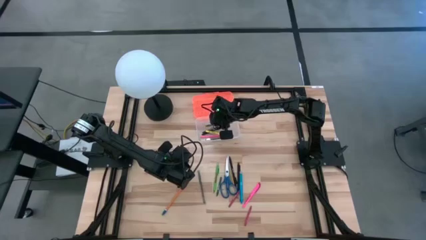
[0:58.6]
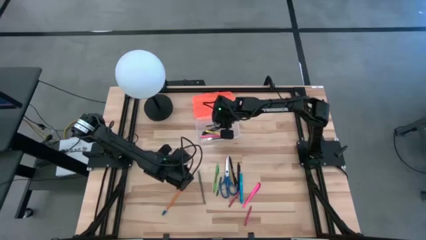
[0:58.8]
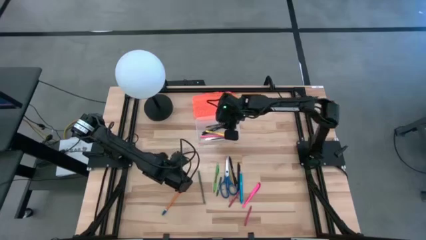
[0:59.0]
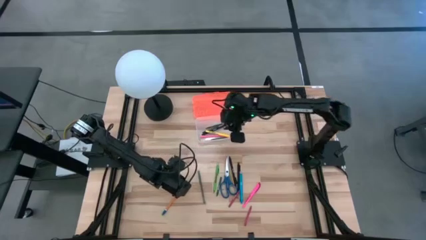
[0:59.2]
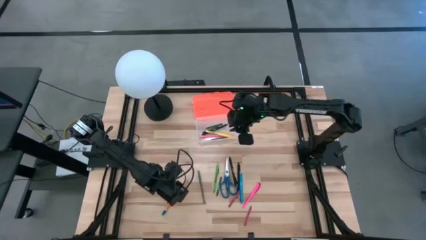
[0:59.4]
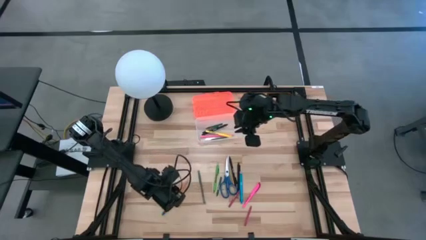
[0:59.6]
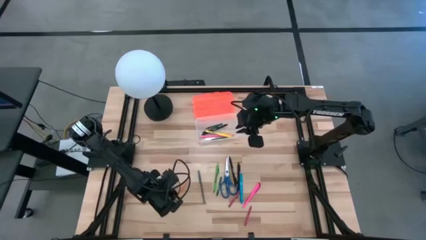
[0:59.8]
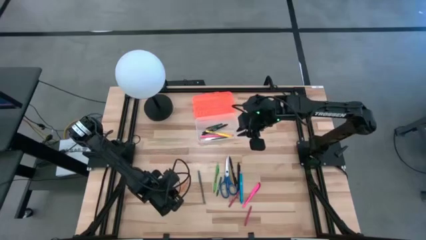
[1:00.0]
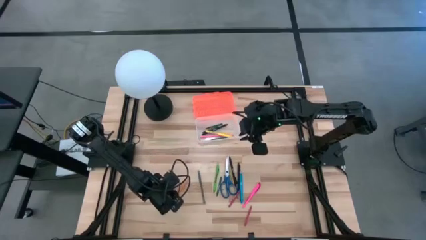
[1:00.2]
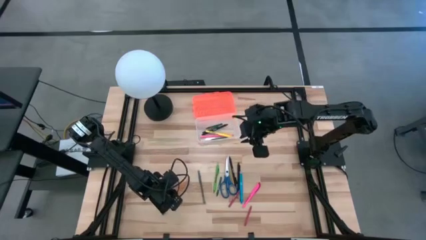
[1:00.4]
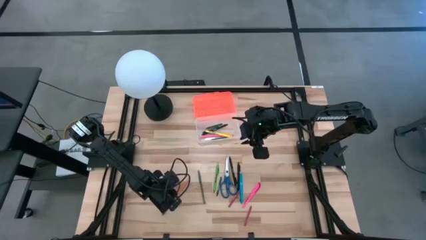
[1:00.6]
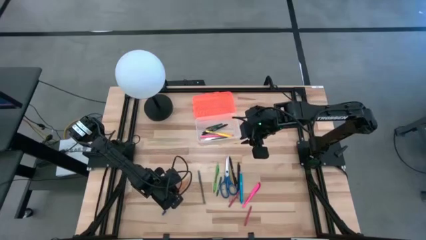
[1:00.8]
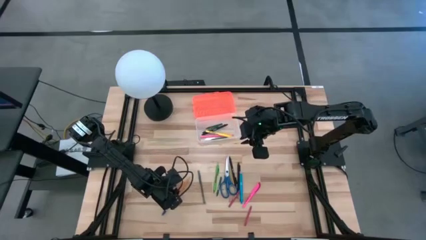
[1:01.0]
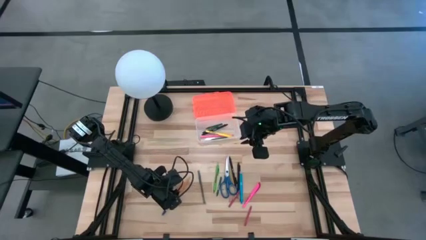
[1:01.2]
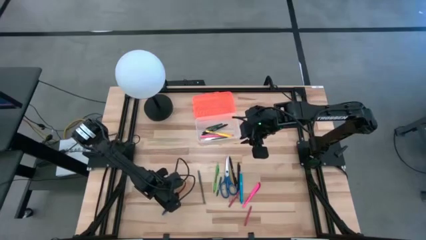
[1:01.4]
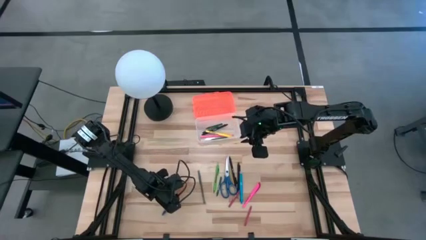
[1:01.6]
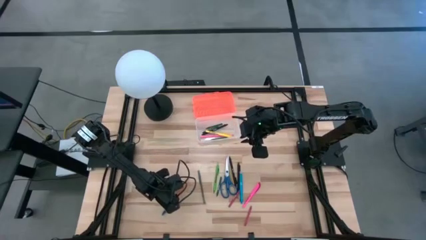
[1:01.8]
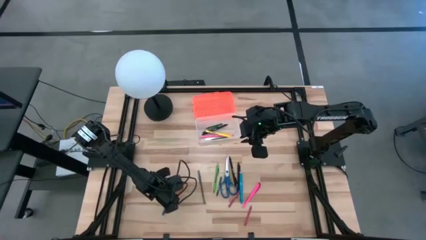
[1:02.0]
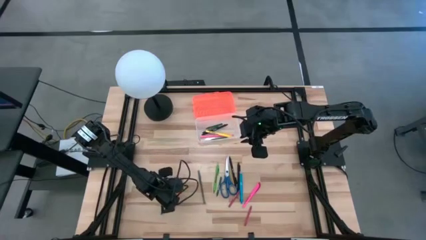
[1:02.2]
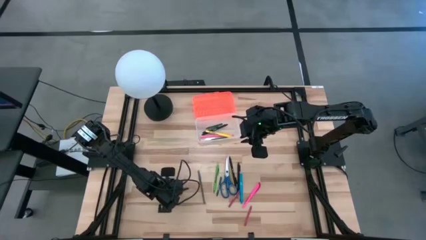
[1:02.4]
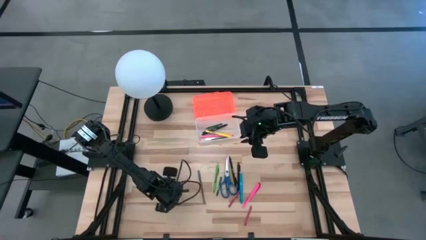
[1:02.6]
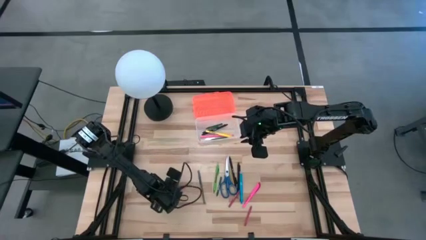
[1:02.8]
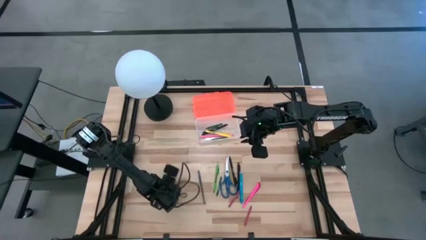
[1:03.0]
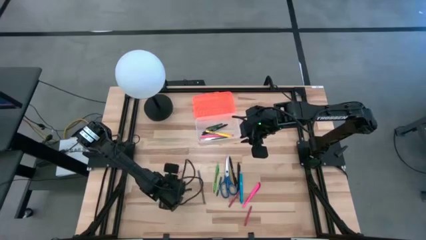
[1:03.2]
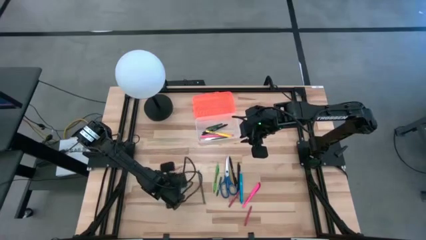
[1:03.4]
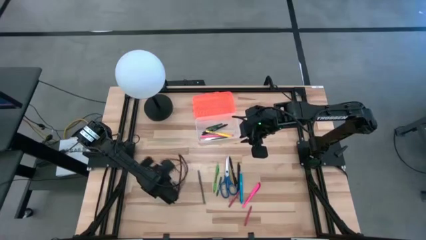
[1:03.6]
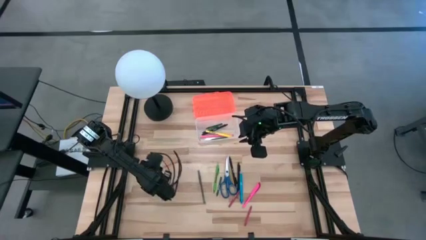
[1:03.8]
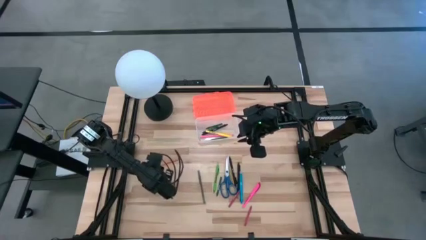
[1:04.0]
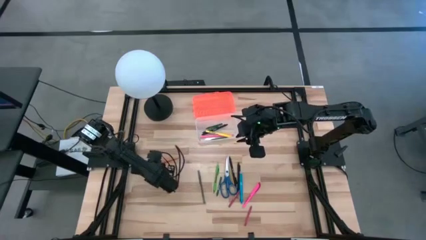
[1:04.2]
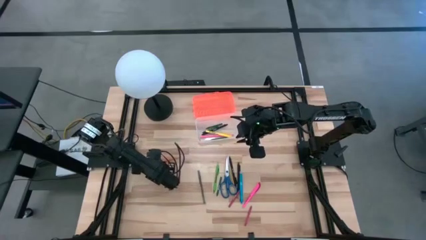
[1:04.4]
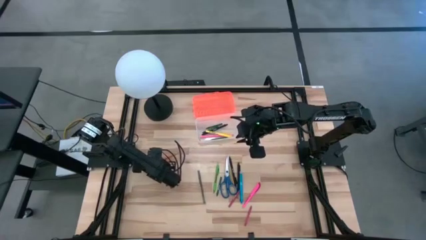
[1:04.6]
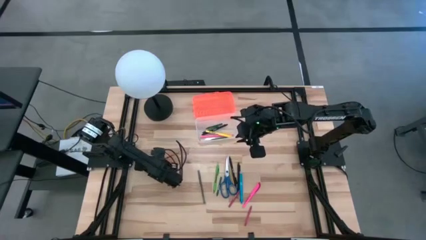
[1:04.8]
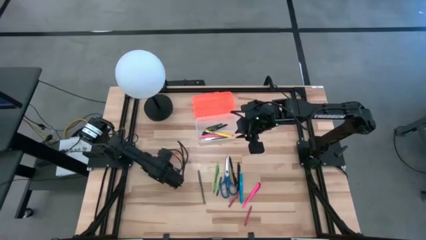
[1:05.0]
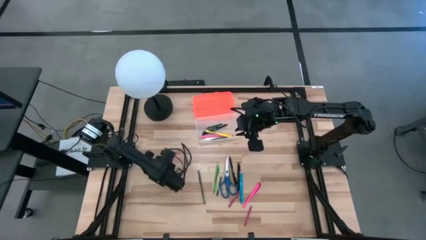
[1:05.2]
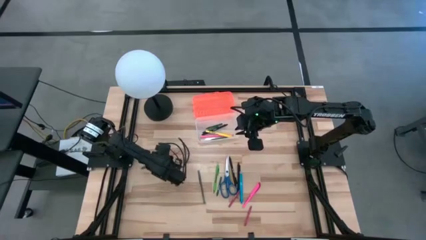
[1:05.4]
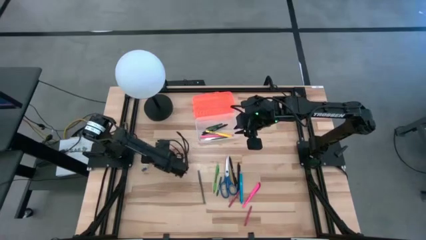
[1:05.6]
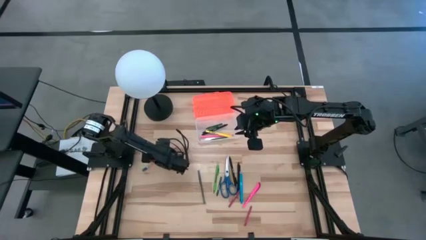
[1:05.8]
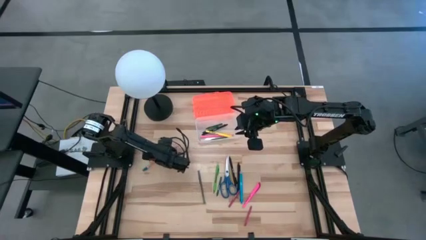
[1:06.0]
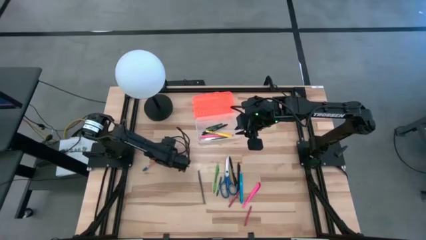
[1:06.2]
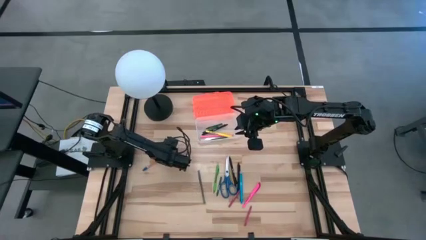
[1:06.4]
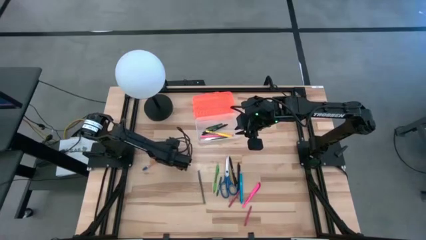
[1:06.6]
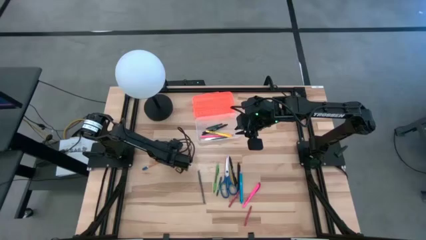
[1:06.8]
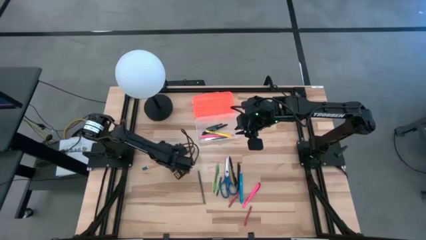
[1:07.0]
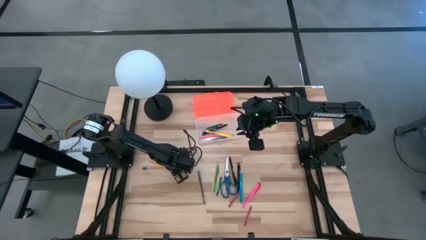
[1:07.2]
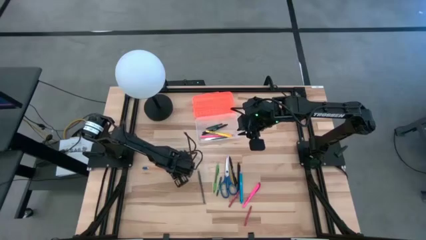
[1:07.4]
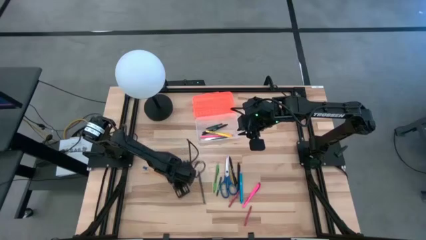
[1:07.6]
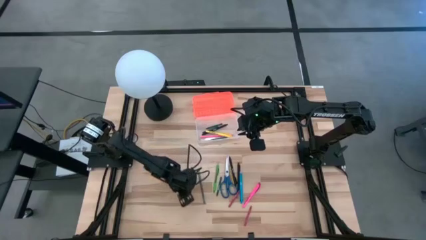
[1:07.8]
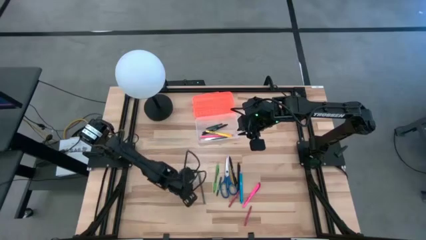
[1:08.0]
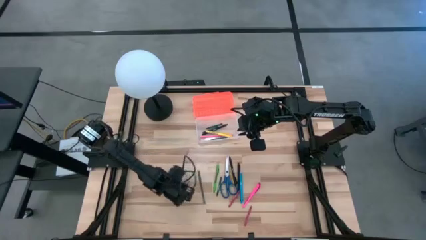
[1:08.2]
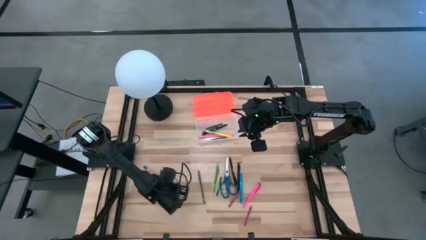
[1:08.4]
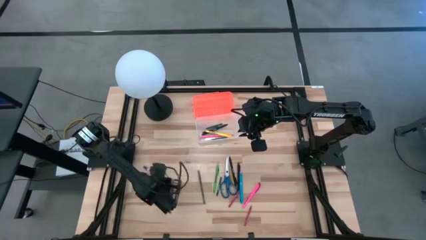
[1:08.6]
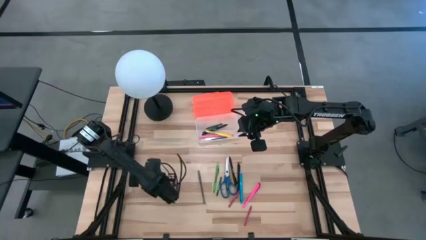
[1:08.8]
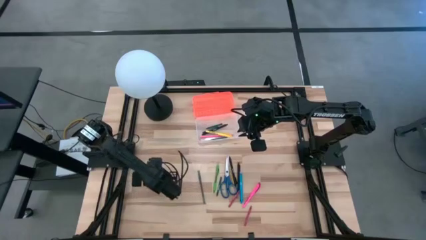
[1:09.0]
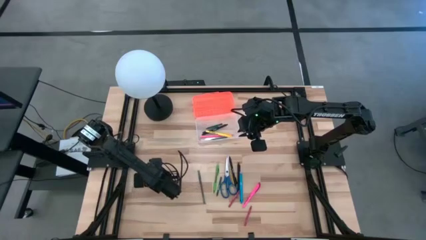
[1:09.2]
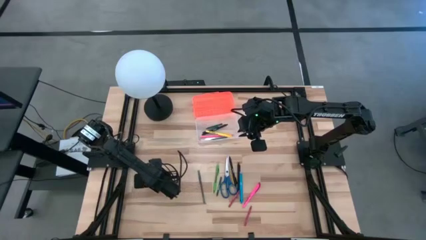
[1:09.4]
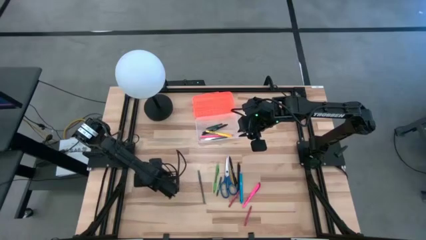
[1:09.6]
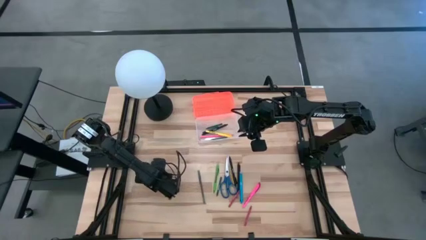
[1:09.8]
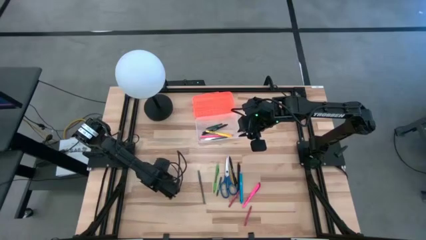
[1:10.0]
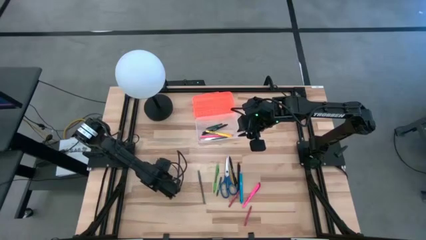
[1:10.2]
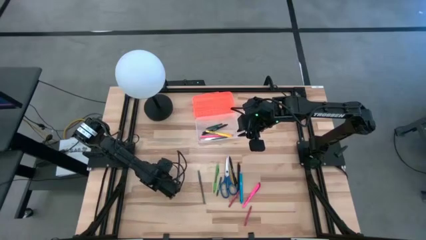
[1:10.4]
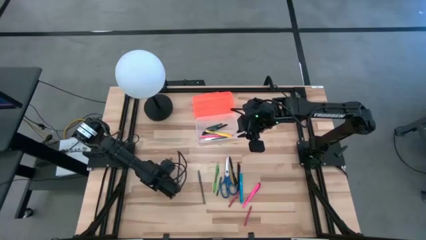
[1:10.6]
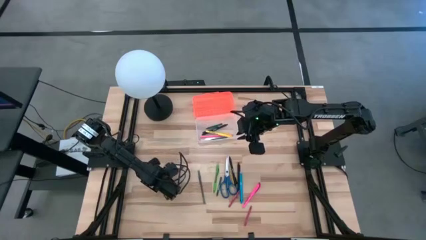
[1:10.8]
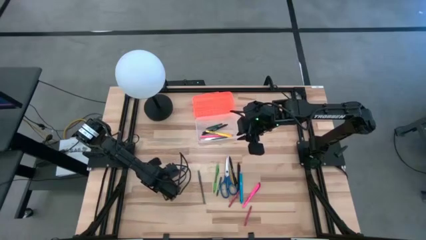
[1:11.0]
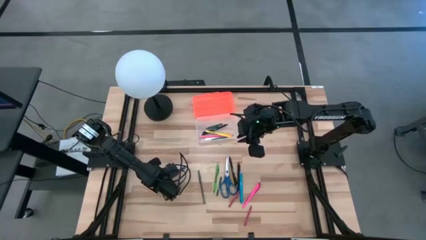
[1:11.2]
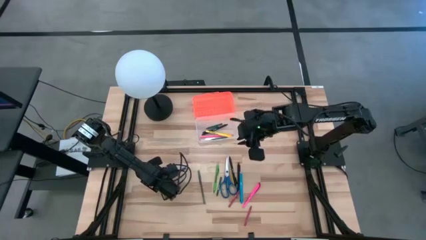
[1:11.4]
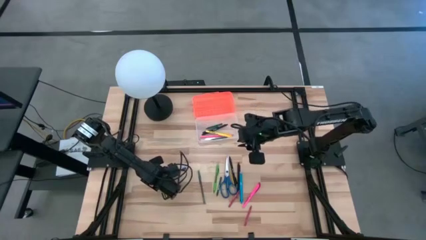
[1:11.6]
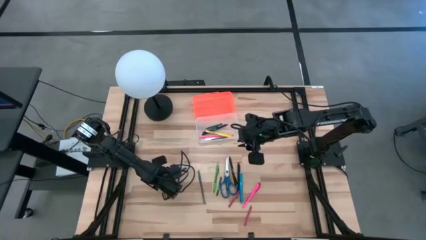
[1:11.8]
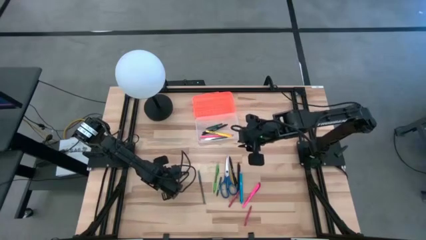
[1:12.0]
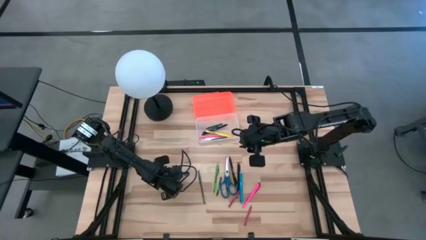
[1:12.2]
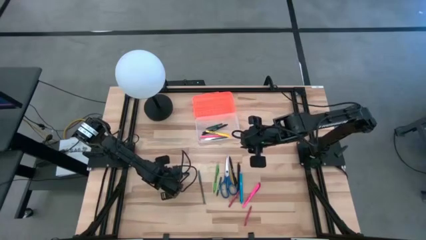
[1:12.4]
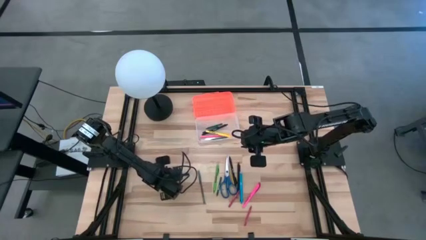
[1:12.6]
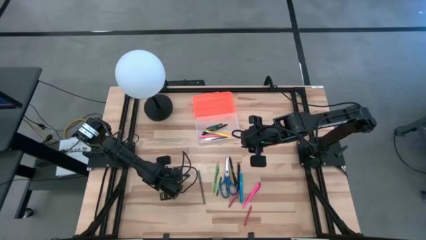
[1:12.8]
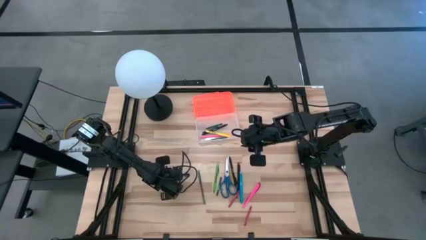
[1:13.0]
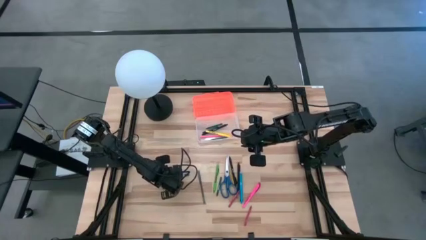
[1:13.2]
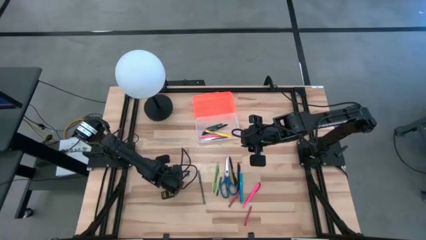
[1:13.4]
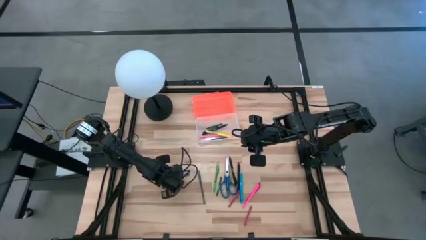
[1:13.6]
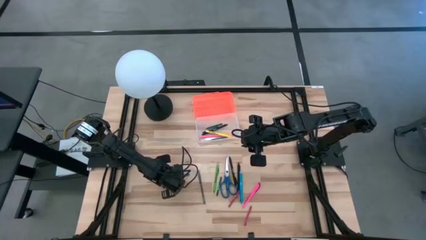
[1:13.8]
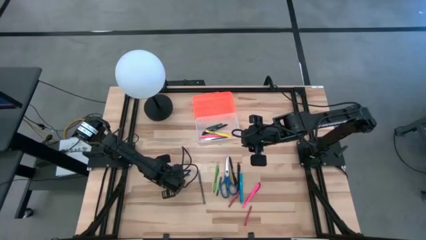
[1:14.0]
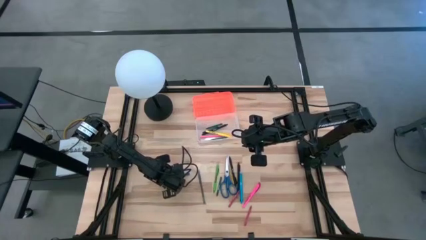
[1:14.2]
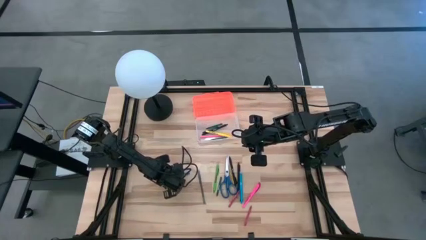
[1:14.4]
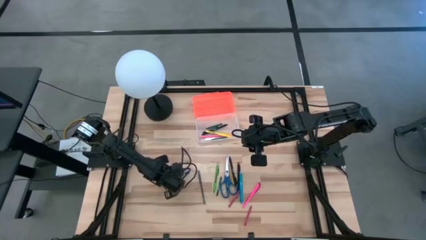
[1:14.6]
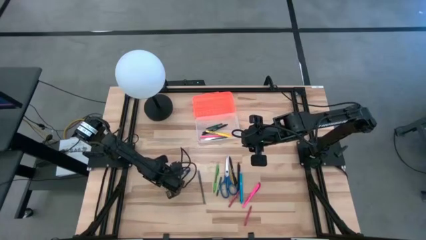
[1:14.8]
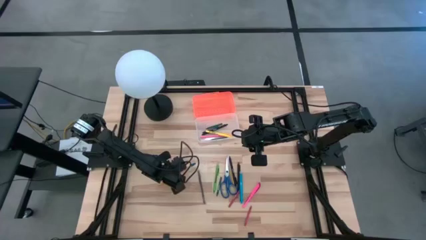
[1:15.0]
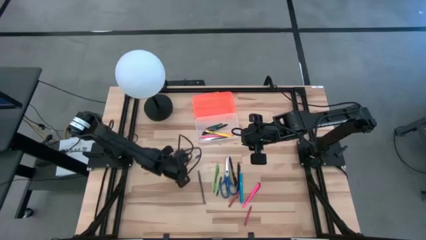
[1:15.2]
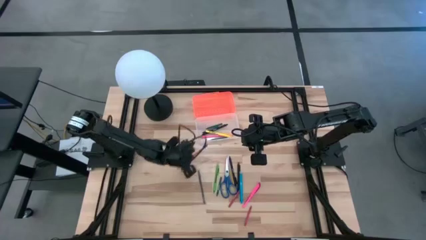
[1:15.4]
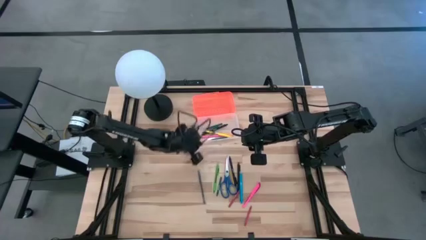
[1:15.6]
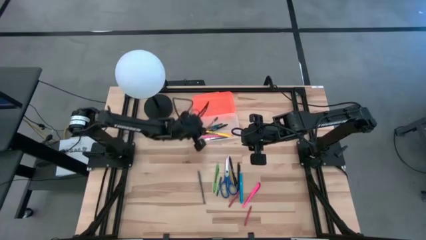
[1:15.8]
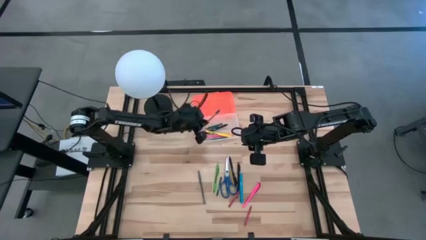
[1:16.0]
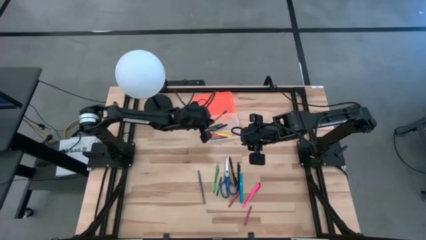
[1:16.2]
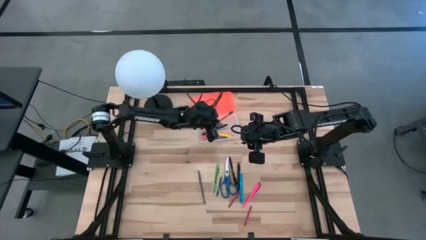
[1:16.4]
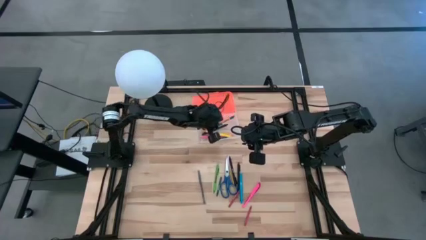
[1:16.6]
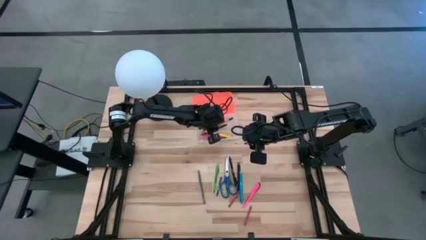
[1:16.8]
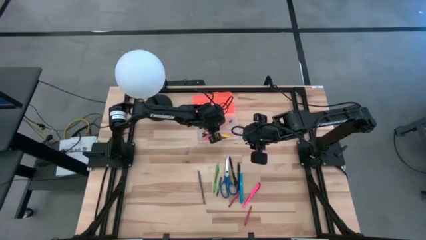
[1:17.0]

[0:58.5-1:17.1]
Task: Pick & place school supplies into a supply box
Put the left orange pencil into the supply box
